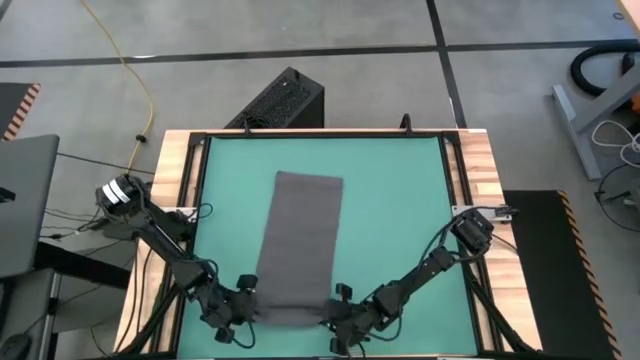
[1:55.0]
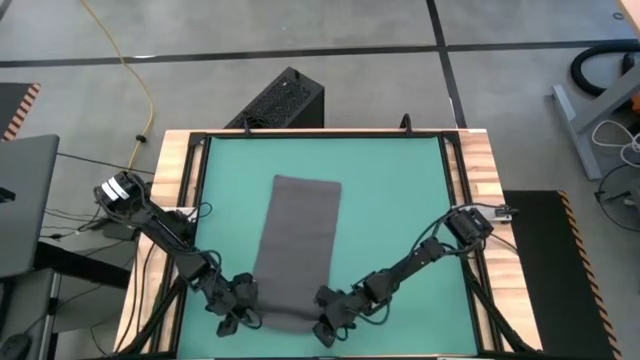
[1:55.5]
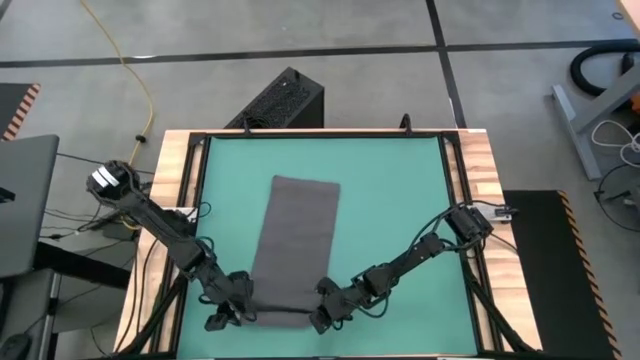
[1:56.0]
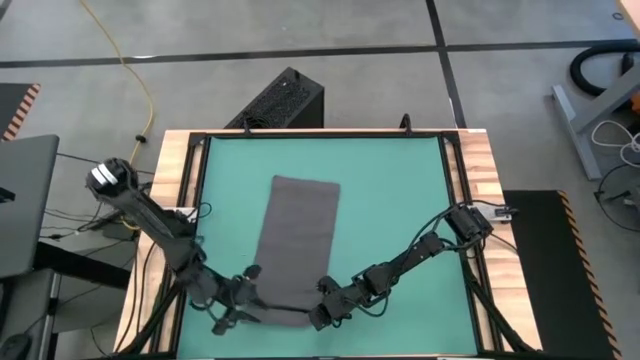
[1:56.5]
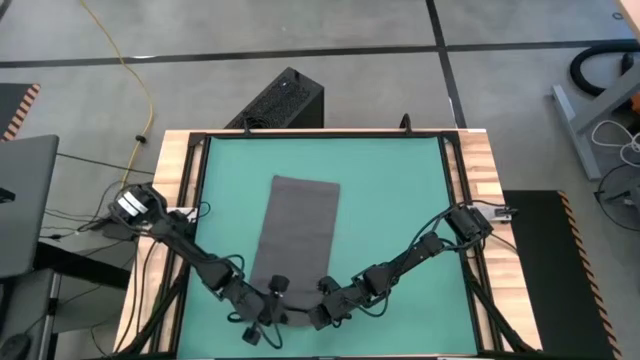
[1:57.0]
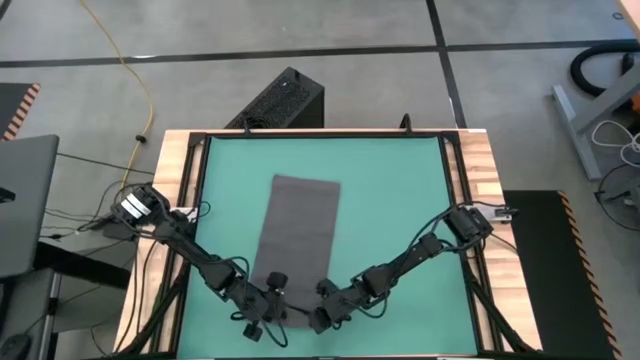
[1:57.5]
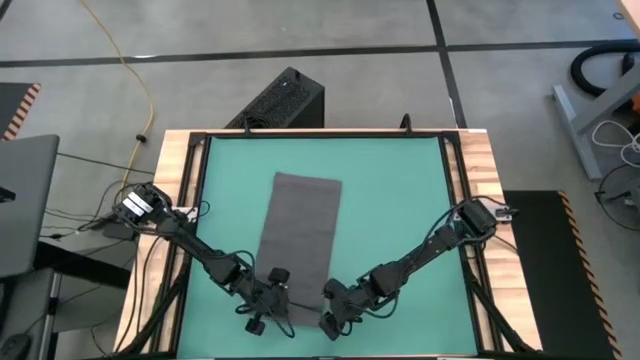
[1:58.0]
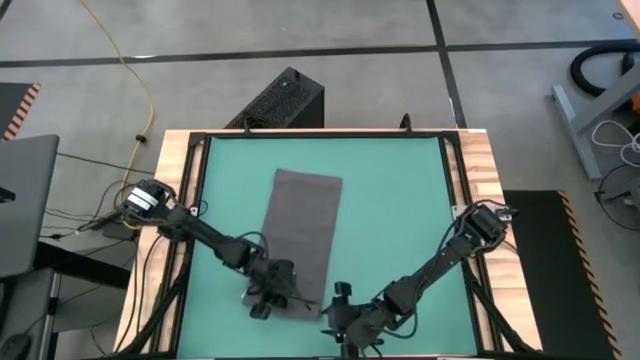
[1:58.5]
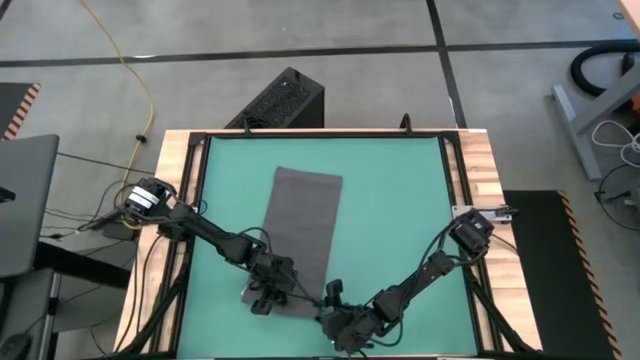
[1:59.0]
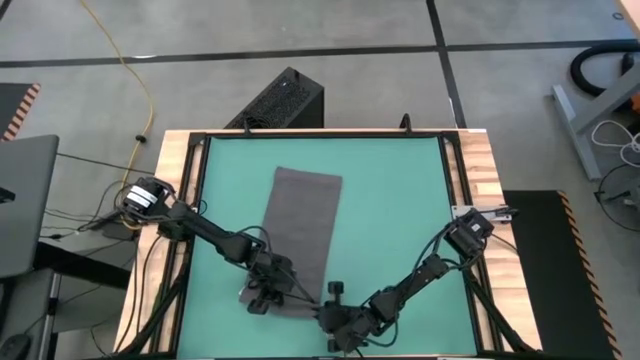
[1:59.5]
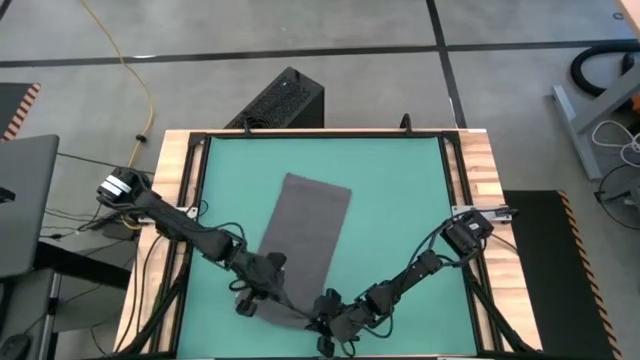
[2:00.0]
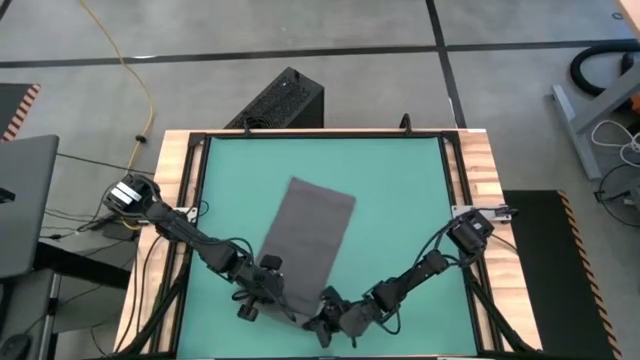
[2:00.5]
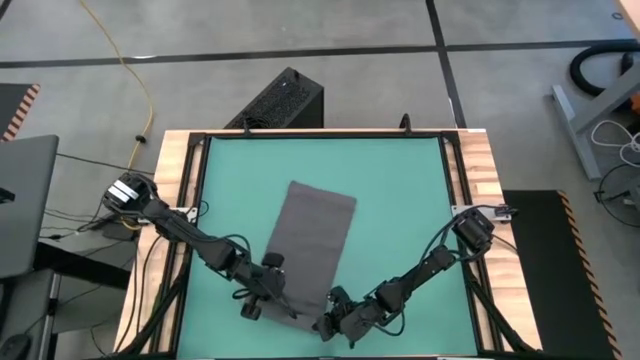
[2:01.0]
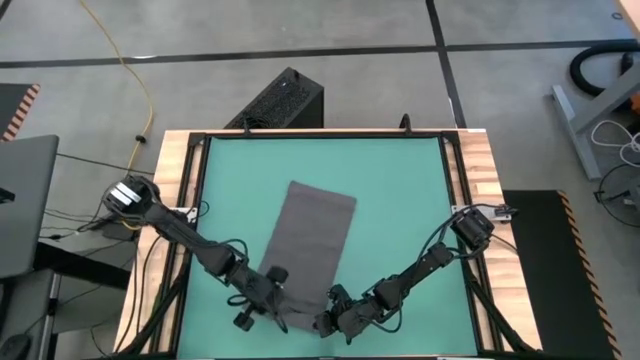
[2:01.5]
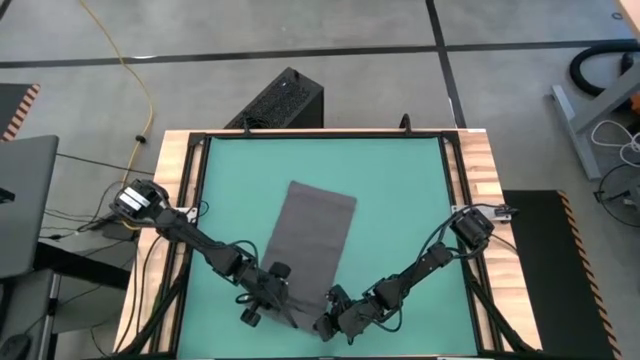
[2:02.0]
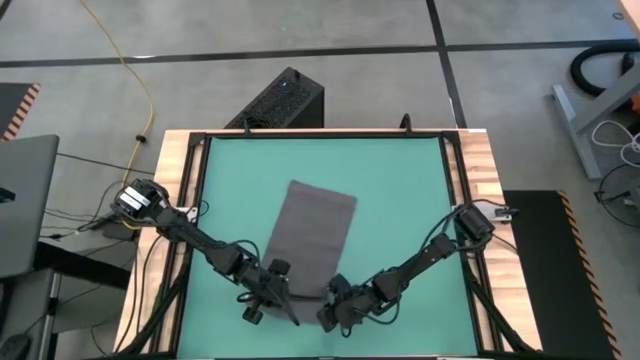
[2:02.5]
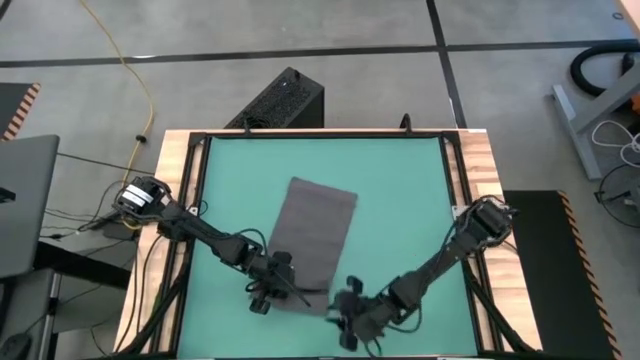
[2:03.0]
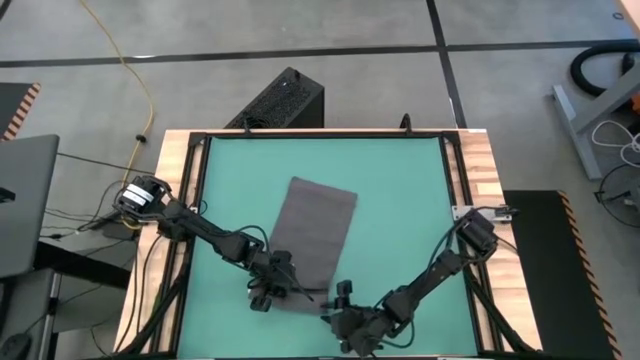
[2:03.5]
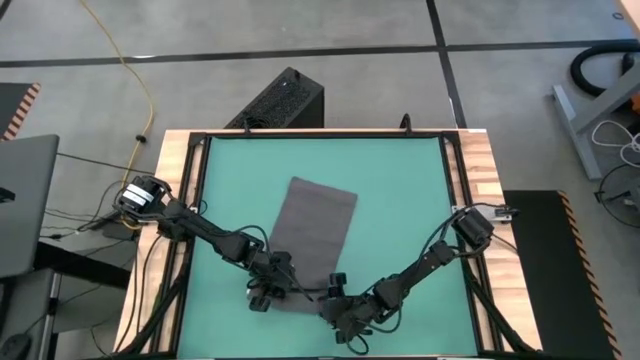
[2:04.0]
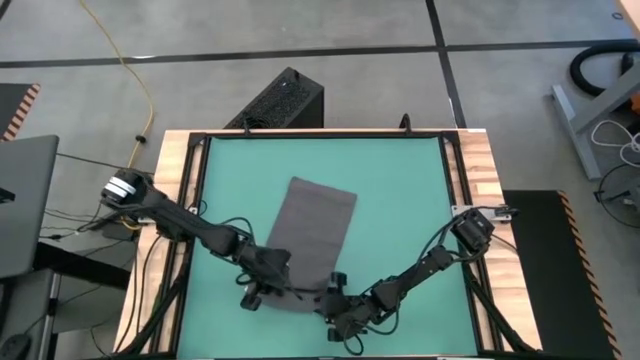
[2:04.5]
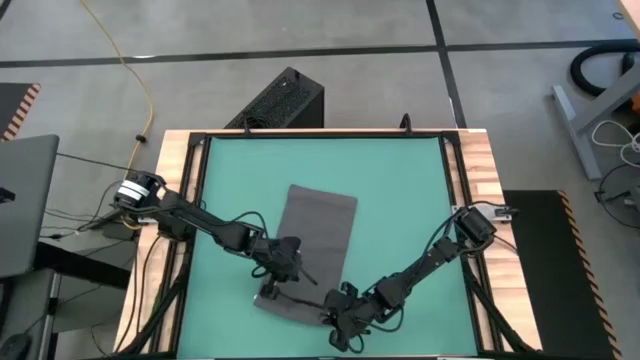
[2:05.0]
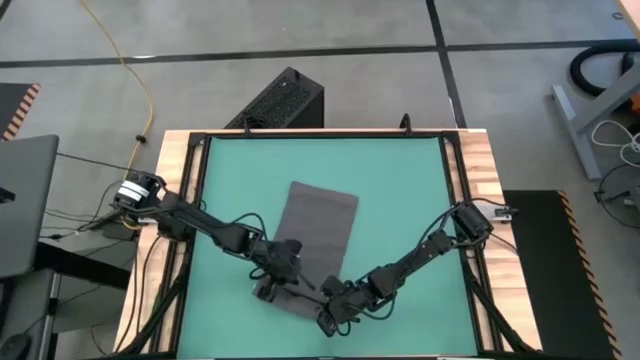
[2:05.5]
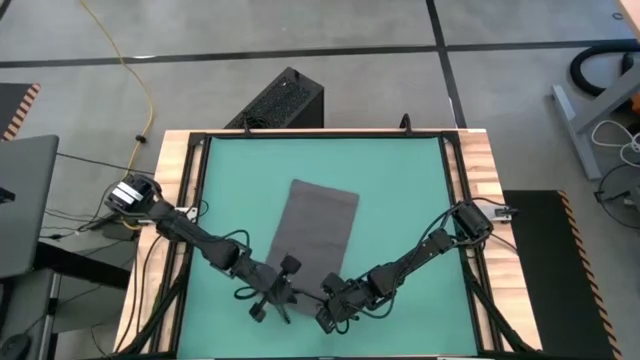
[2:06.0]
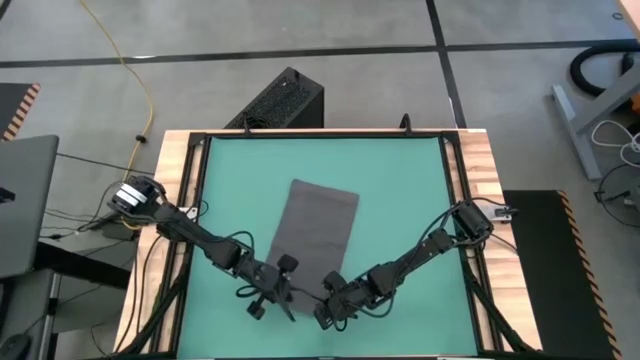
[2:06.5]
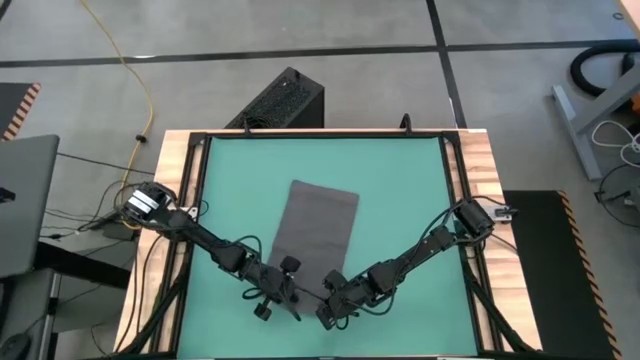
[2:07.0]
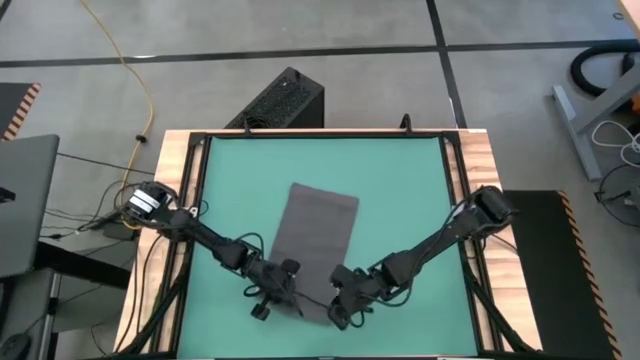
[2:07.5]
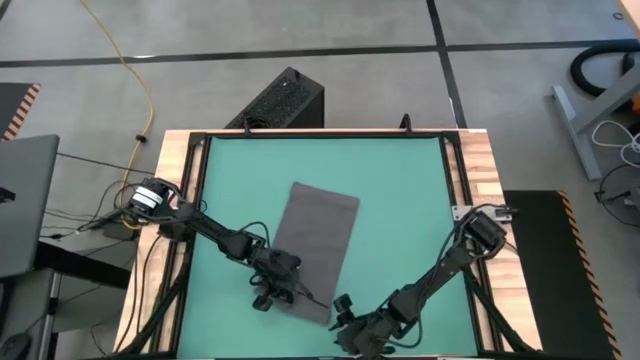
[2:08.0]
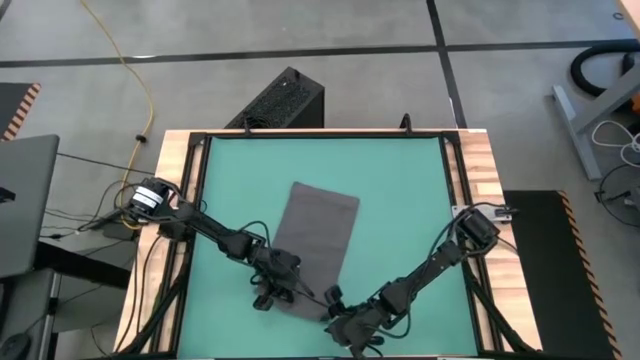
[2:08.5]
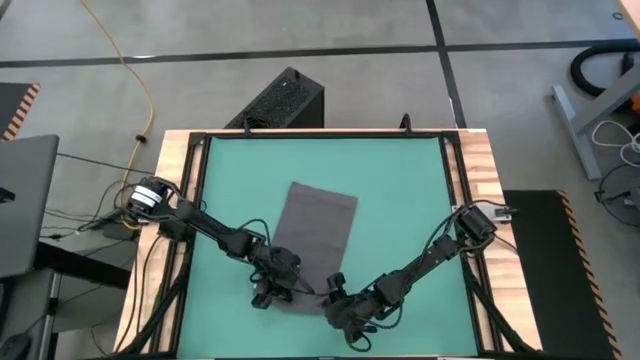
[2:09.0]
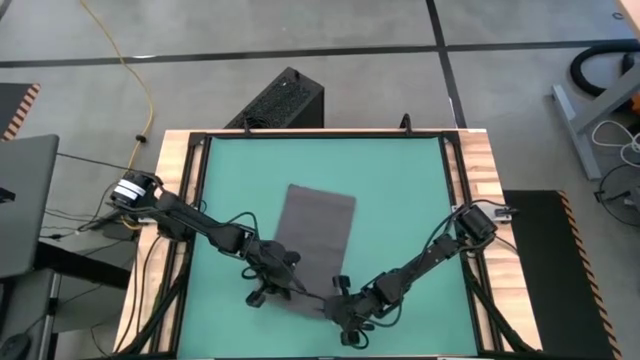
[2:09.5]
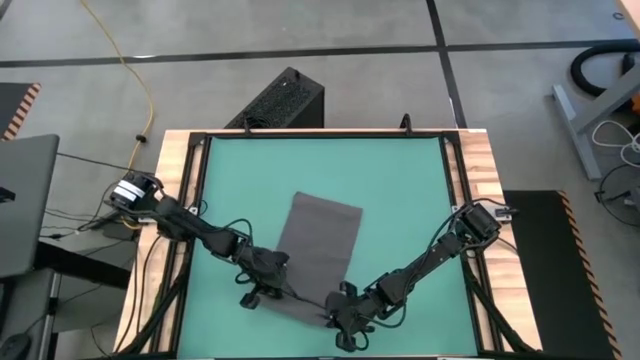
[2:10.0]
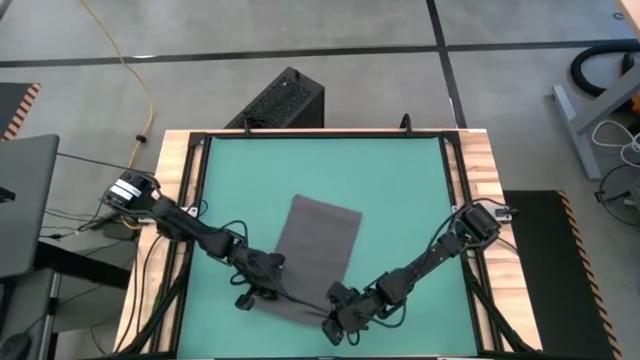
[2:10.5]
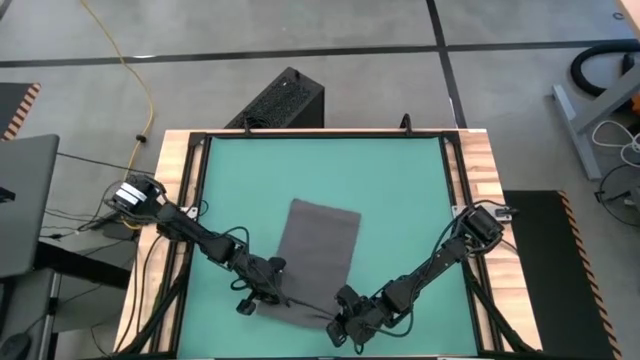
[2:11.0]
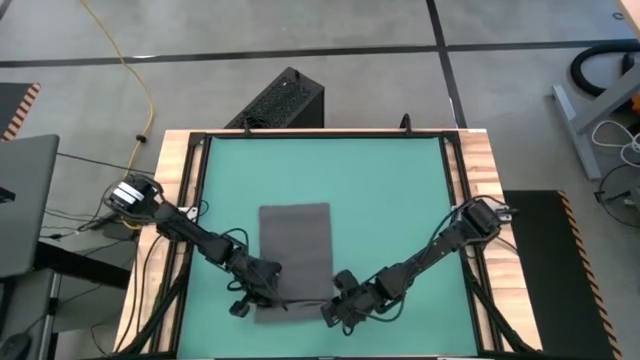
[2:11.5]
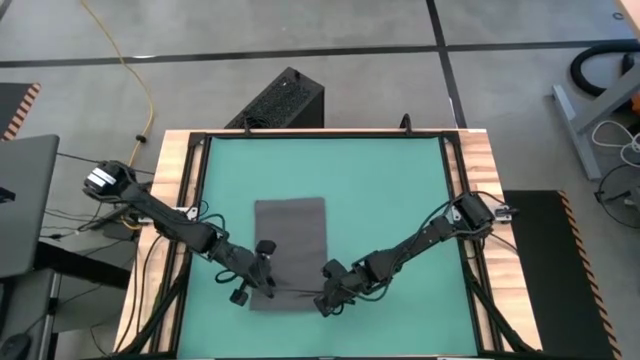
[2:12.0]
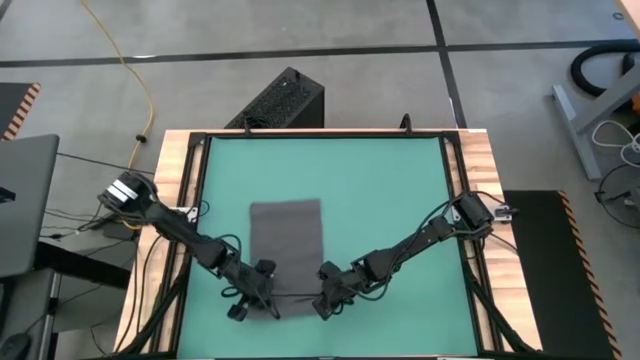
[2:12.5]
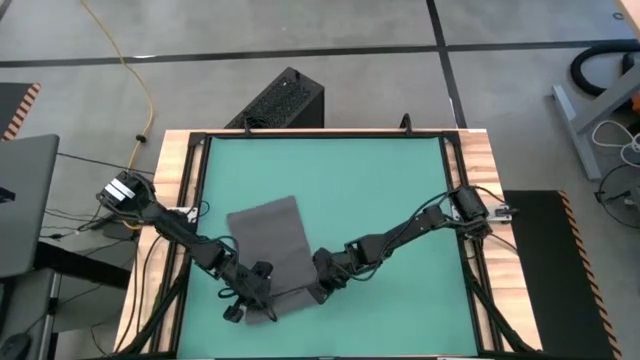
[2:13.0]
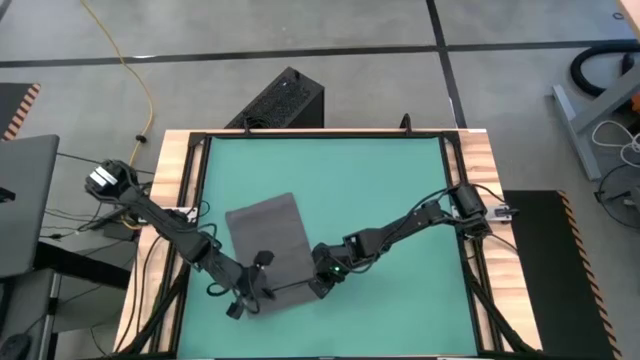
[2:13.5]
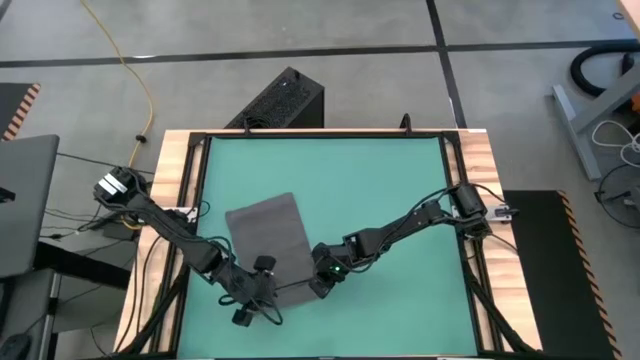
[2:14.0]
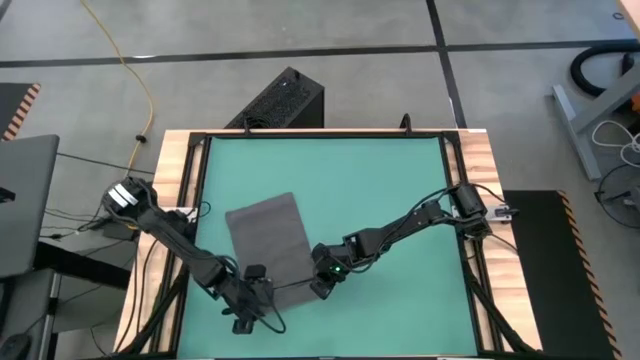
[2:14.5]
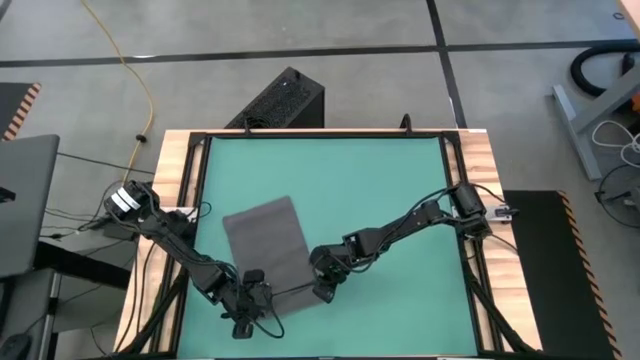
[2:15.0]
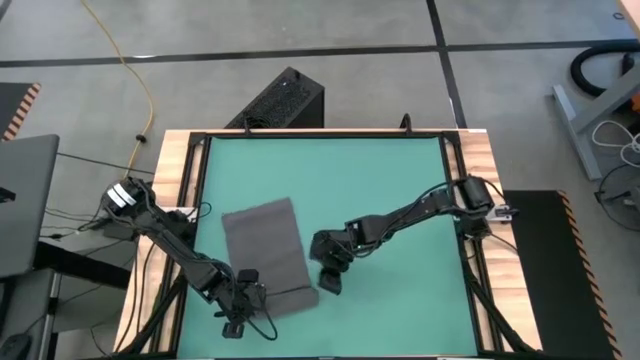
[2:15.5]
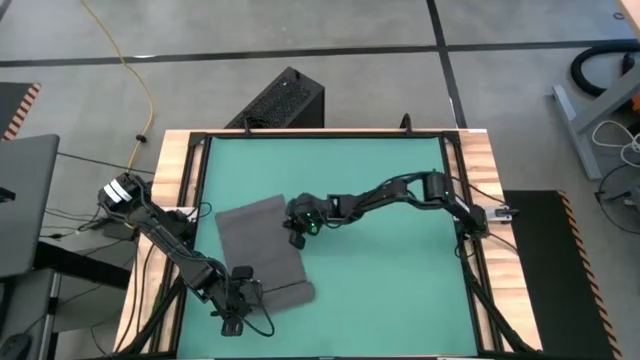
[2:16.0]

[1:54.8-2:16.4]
Task: Roll towel
Roll the gray towel

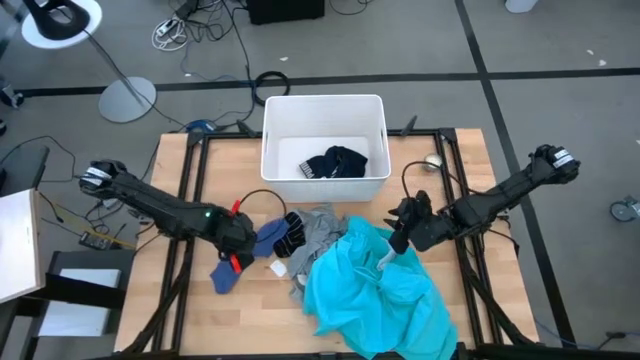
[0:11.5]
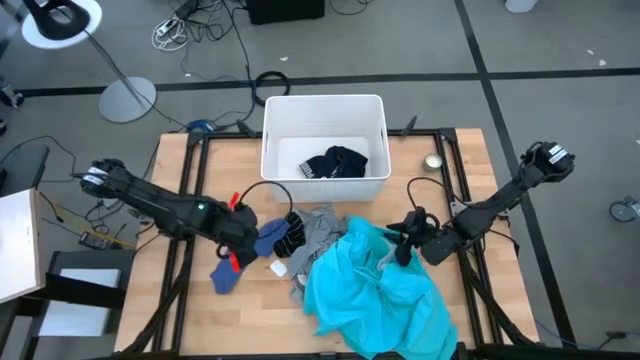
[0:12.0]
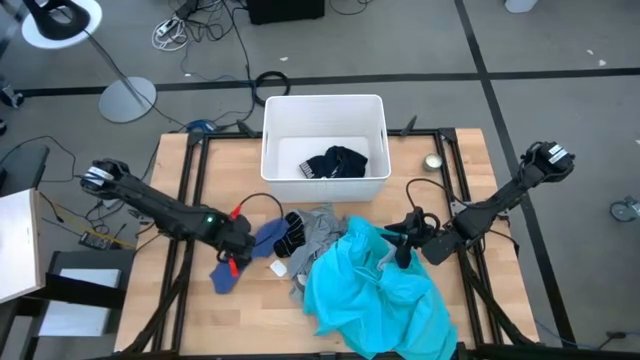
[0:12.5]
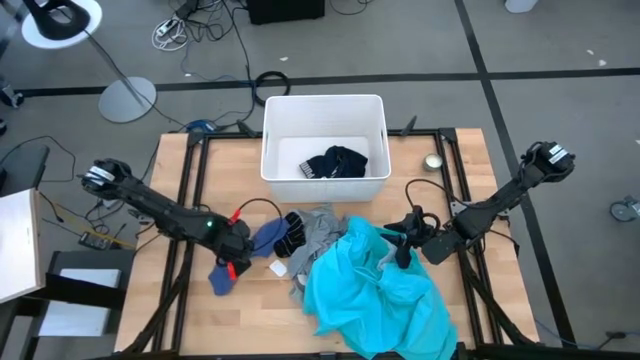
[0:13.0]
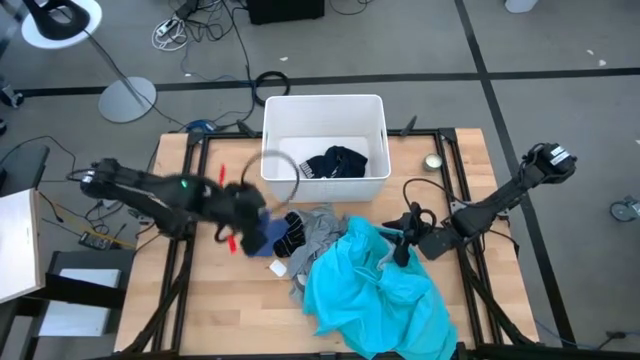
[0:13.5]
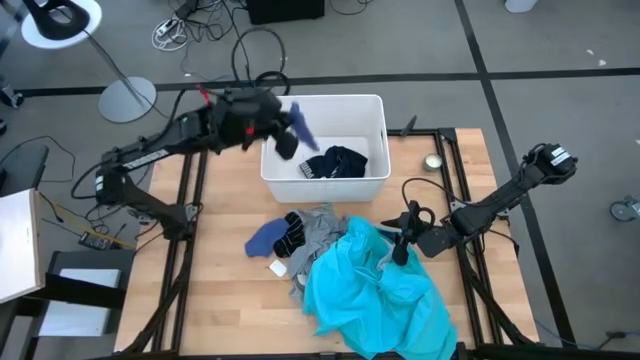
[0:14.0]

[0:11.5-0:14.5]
Task: Sort clothes
Put the bottom blue sock into the white bin
